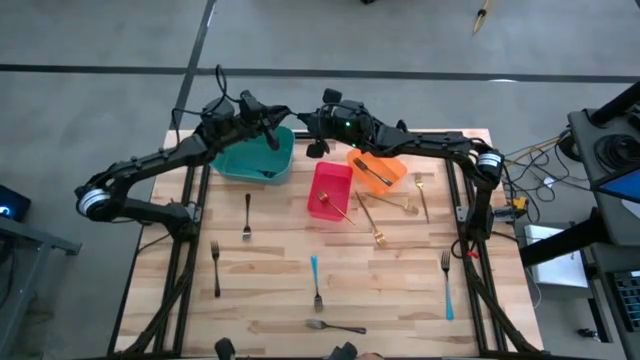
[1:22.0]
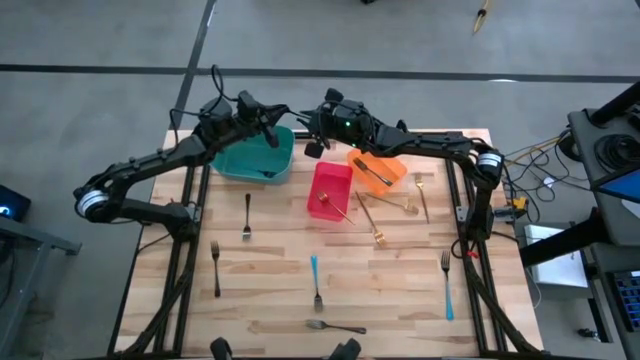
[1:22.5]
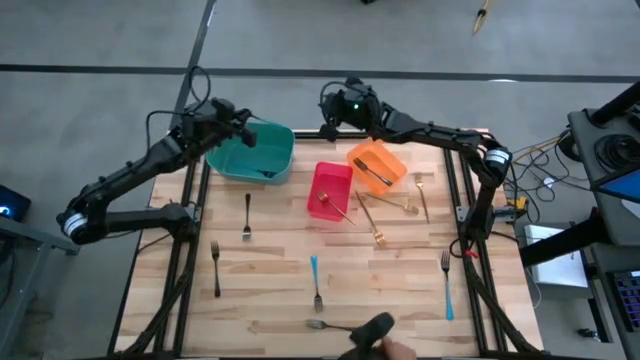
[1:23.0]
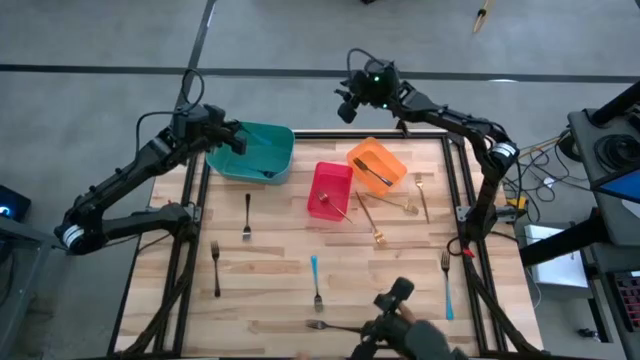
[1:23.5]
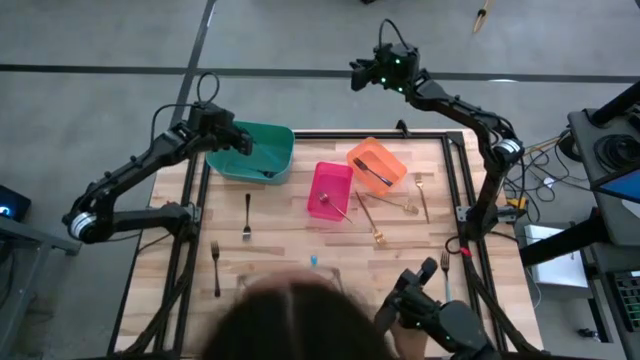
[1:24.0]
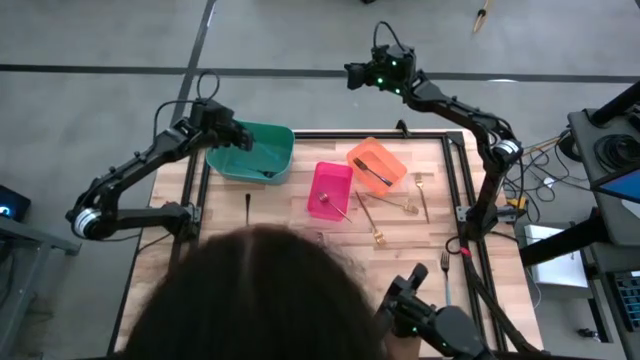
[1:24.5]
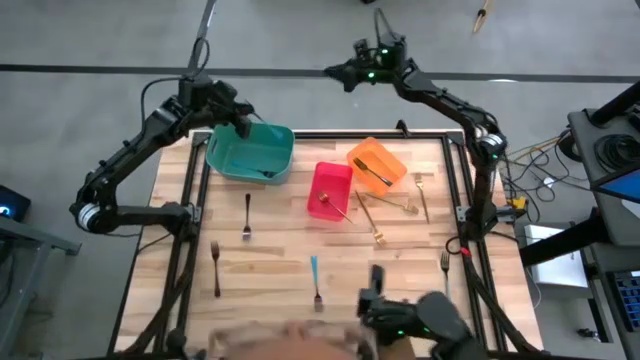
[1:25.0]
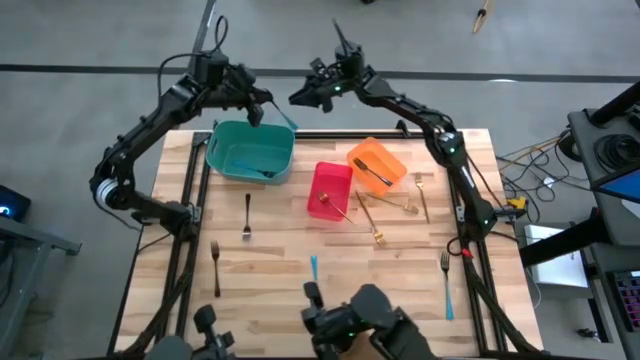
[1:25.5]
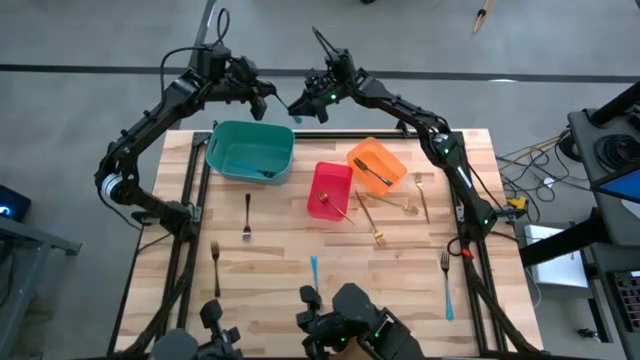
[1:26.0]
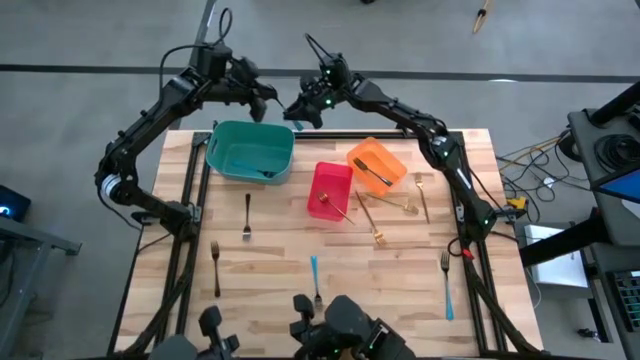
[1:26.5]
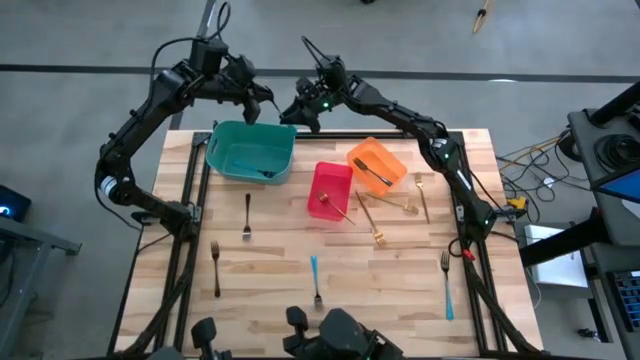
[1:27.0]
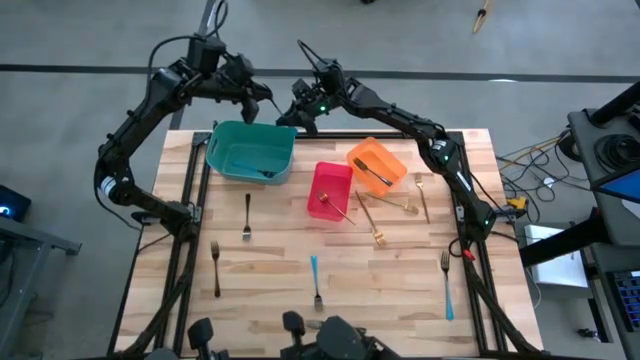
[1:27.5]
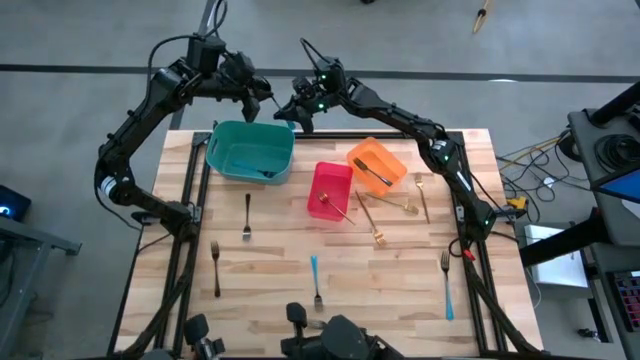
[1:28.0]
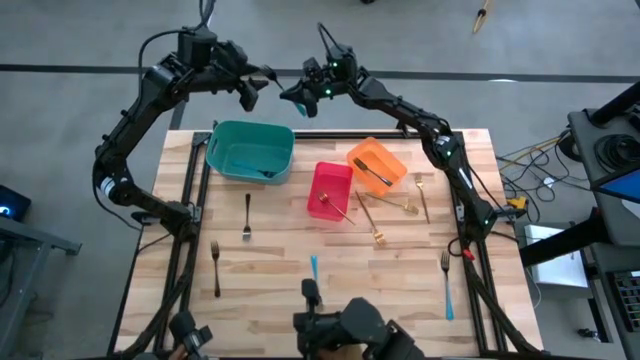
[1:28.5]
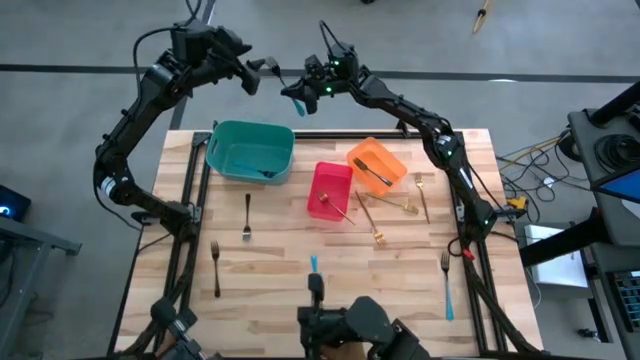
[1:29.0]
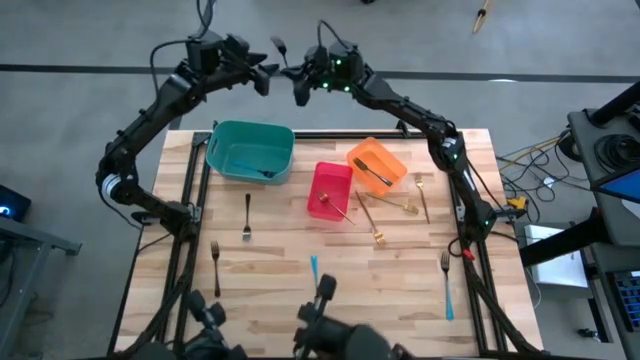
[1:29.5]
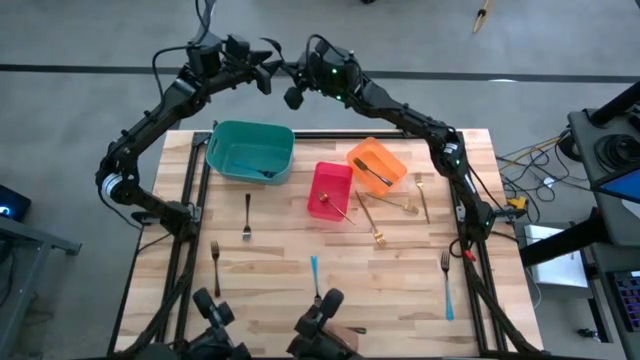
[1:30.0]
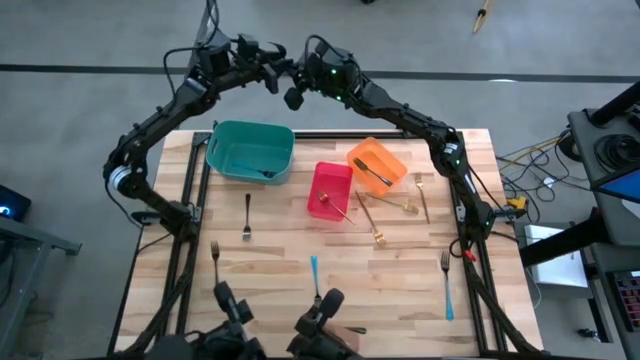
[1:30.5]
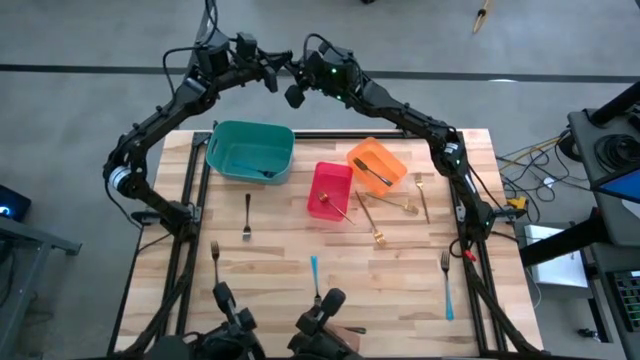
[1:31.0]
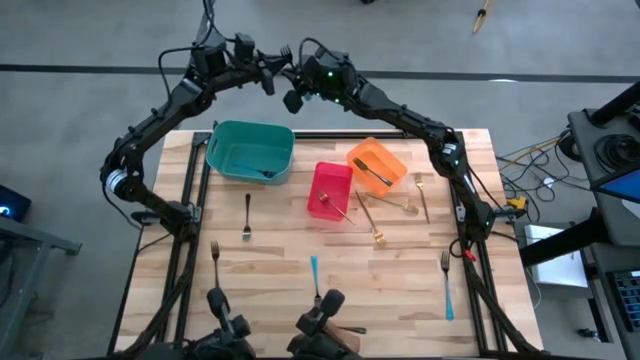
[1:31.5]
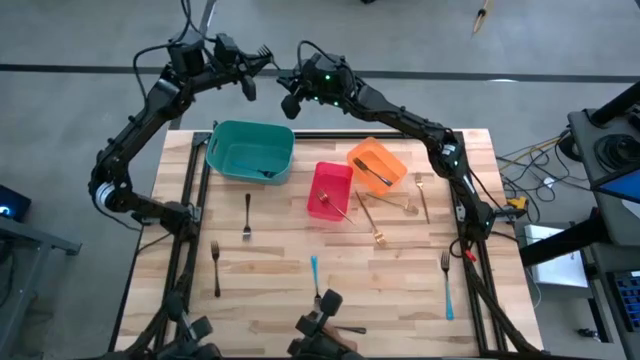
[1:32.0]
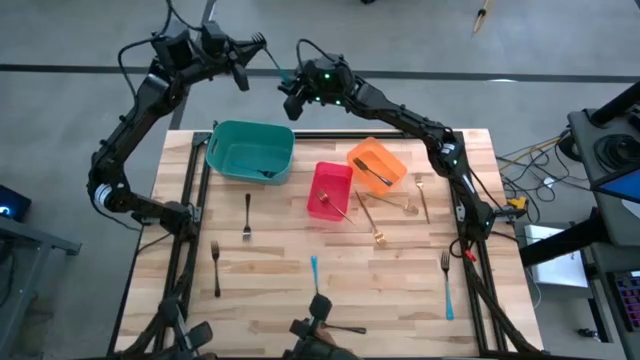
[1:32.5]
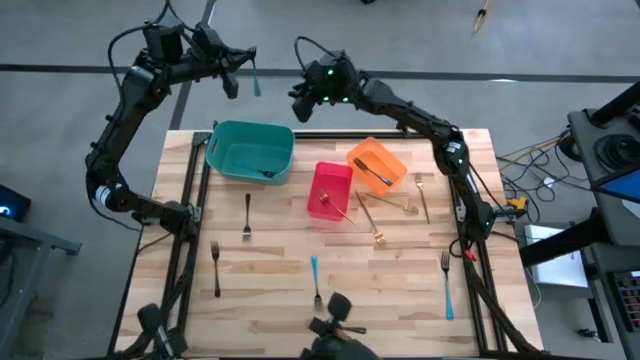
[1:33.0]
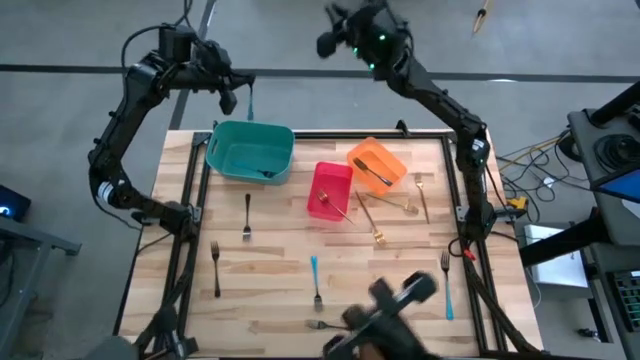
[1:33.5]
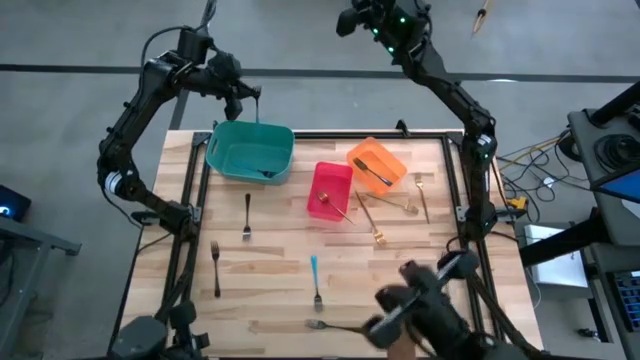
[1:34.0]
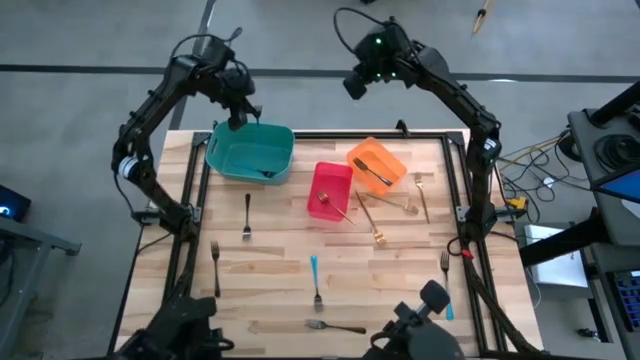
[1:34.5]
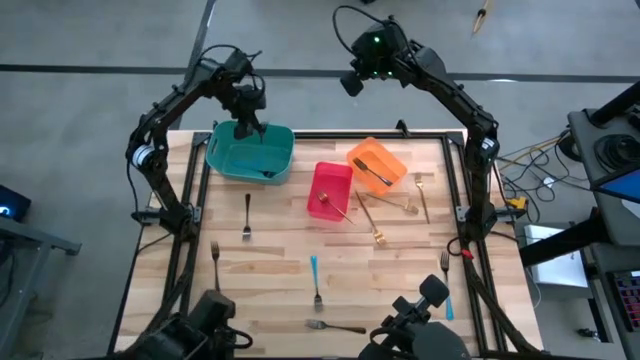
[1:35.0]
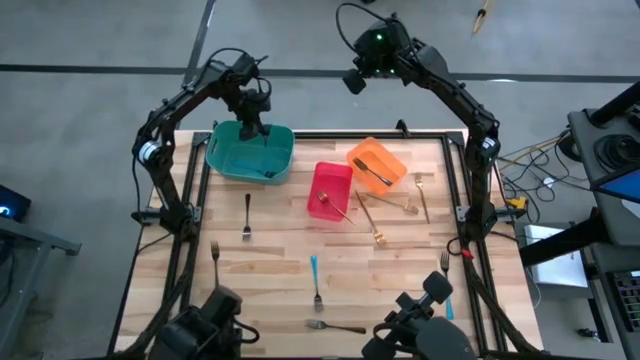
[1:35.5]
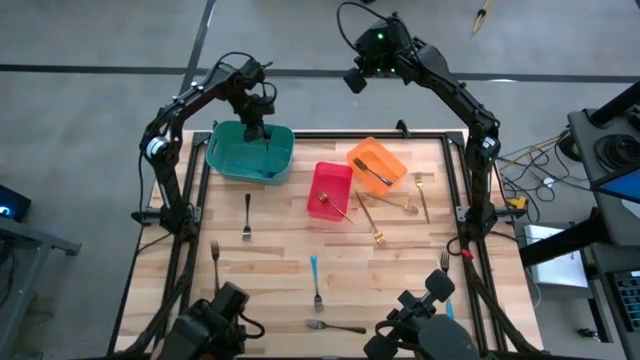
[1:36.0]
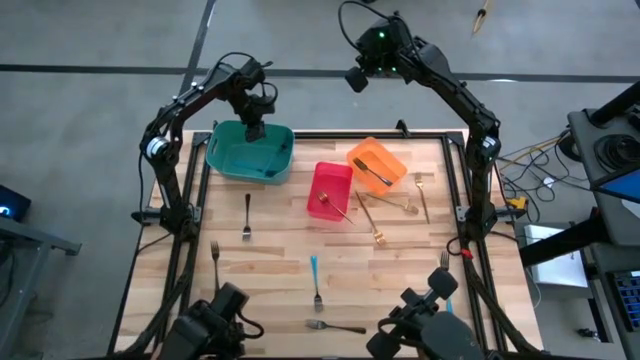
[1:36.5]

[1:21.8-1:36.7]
Task: Sort silverware by color (type)
Put the blue fork into the green bin

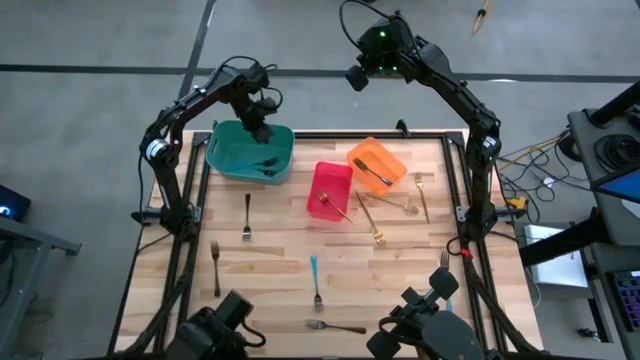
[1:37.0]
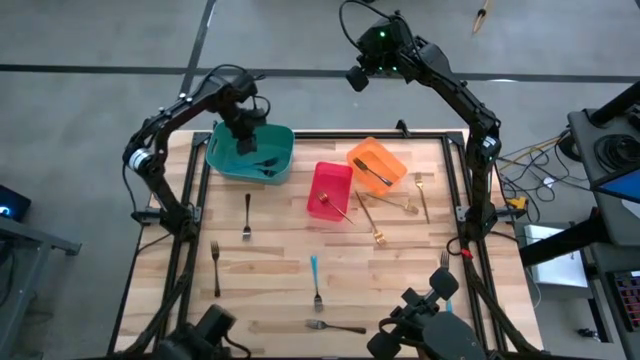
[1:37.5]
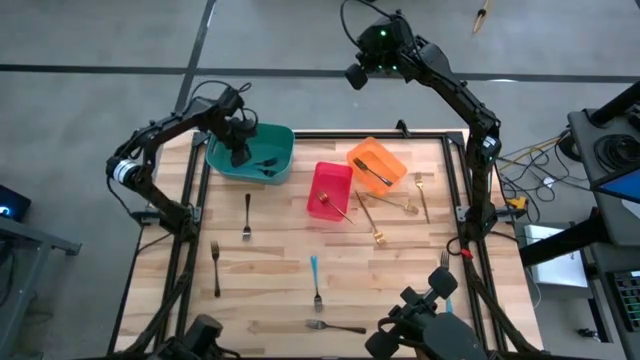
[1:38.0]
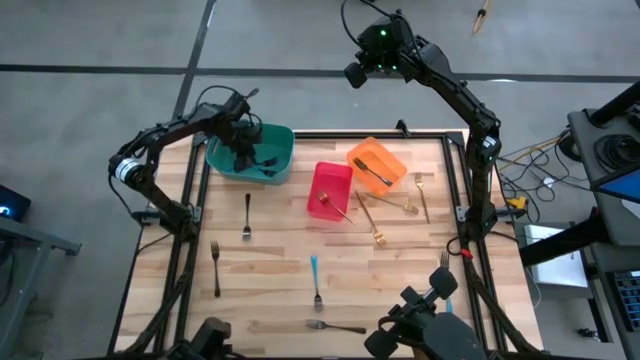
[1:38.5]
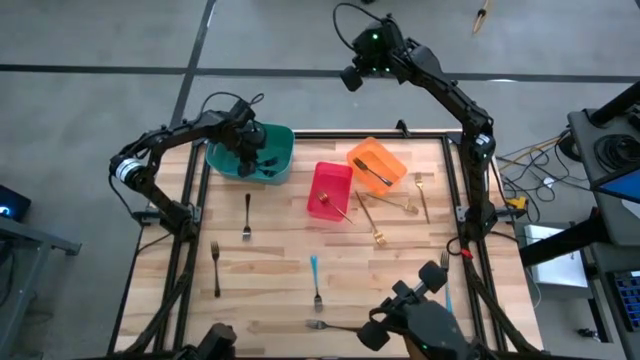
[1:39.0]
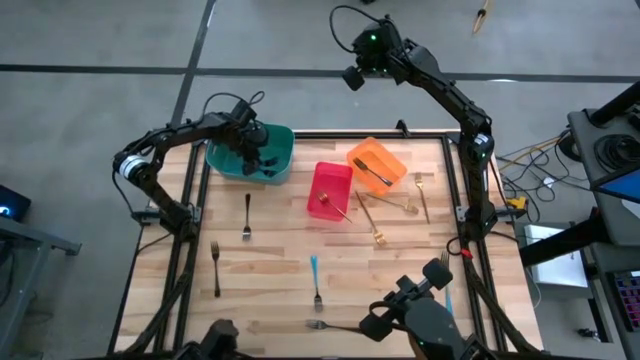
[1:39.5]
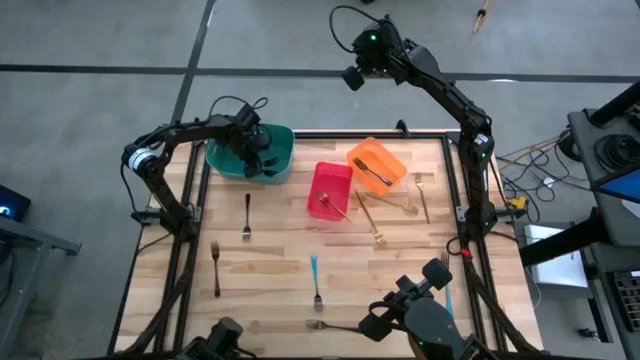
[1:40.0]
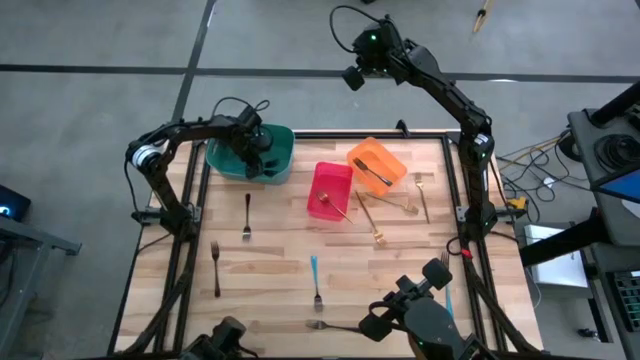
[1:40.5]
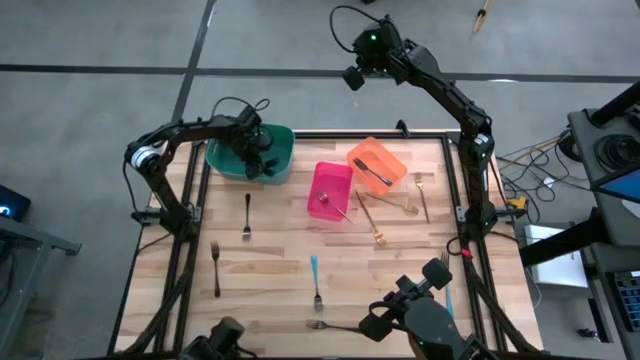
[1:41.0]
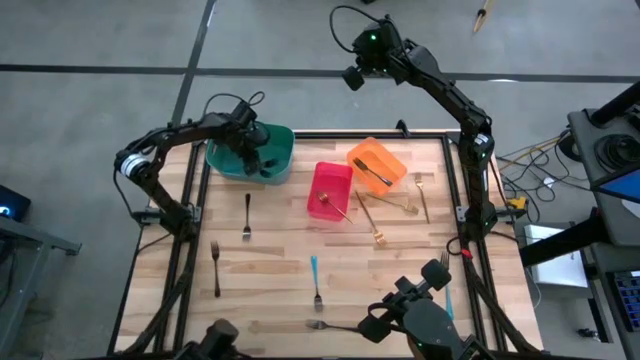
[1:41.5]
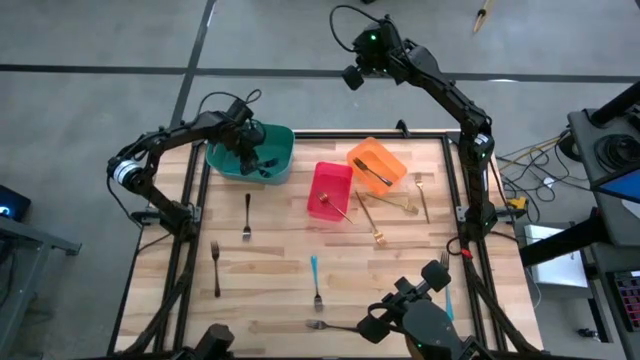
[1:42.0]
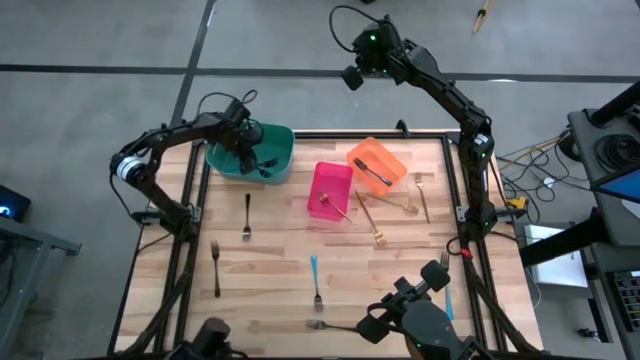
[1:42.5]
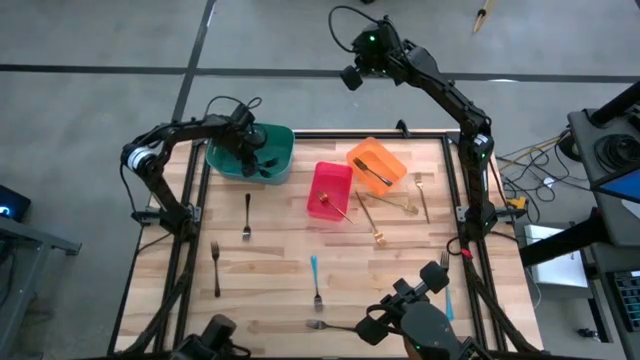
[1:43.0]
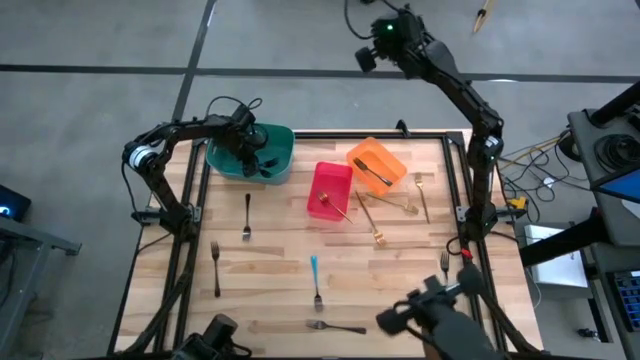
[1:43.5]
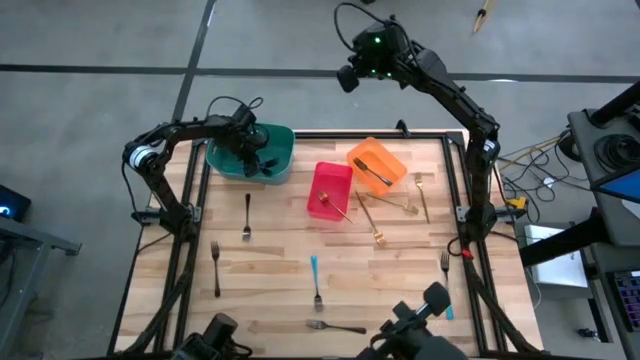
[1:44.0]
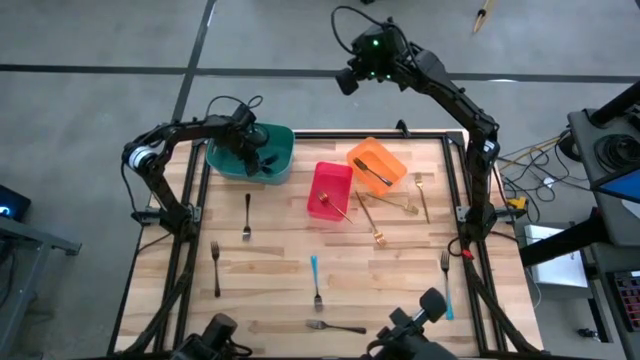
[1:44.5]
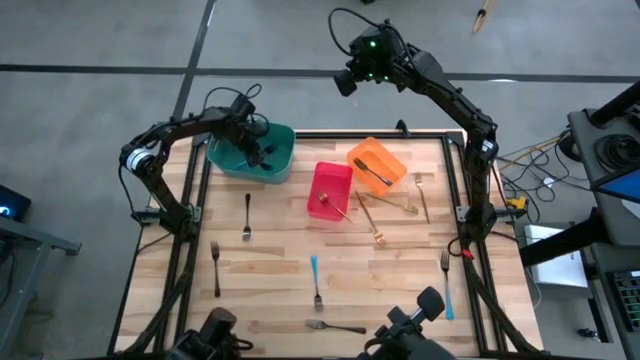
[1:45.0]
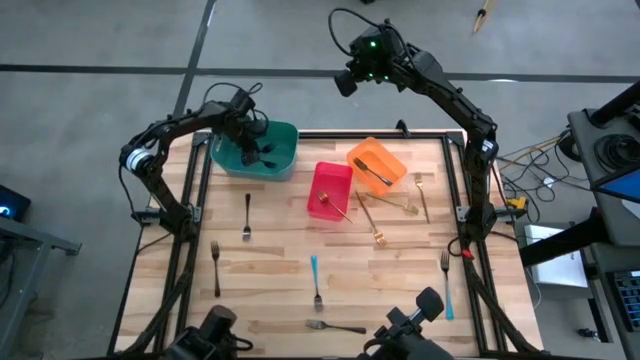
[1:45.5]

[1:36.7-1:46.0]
Adjust the blue fork in the green bin
